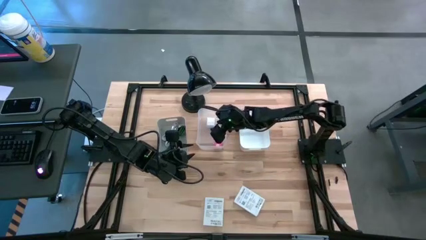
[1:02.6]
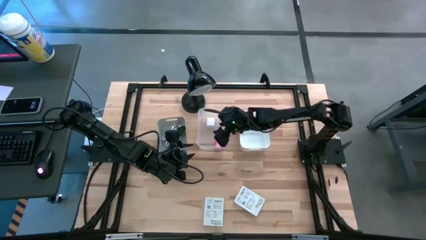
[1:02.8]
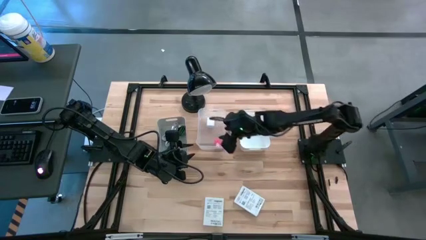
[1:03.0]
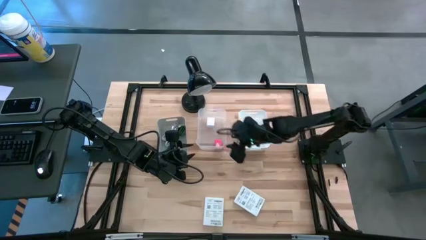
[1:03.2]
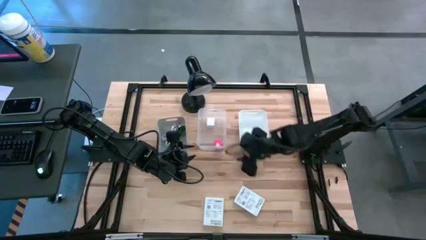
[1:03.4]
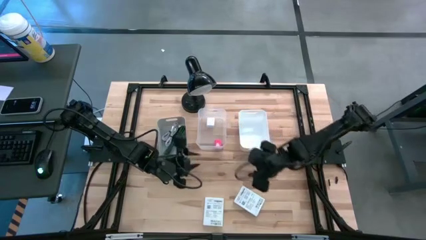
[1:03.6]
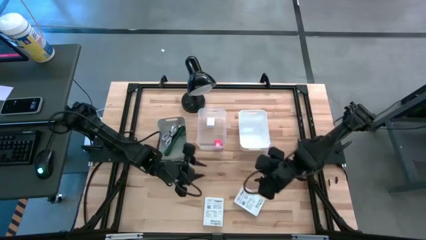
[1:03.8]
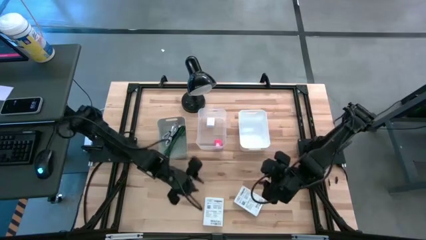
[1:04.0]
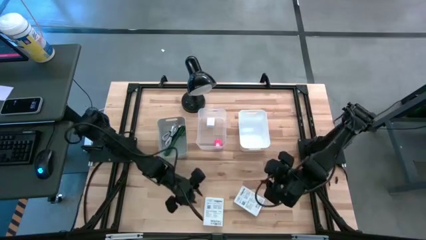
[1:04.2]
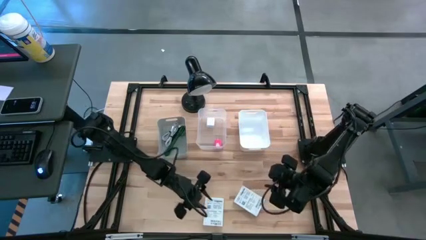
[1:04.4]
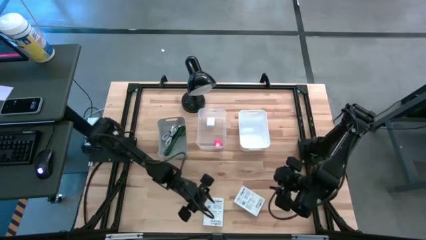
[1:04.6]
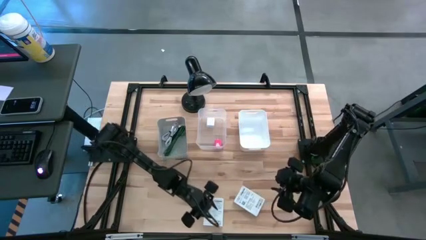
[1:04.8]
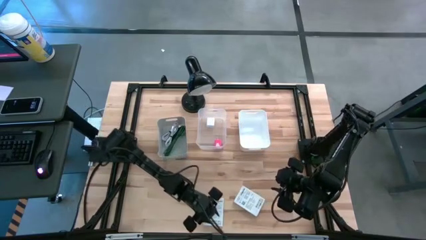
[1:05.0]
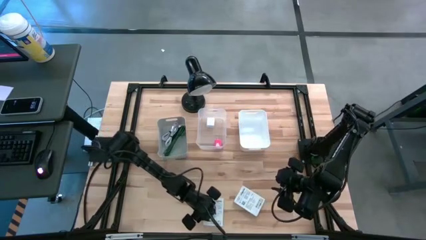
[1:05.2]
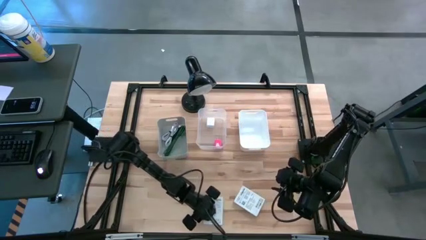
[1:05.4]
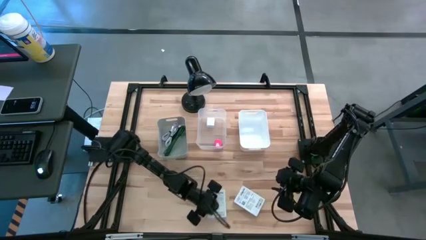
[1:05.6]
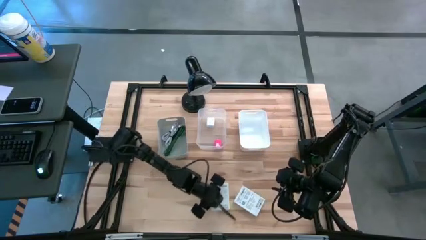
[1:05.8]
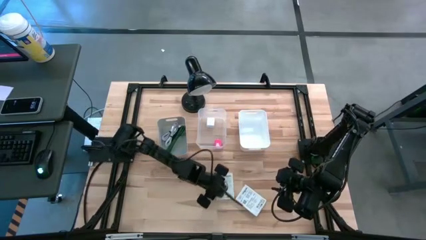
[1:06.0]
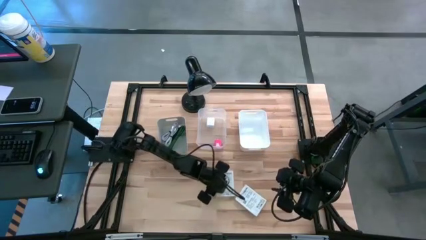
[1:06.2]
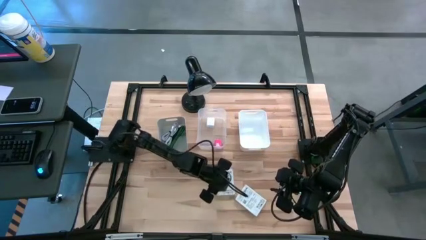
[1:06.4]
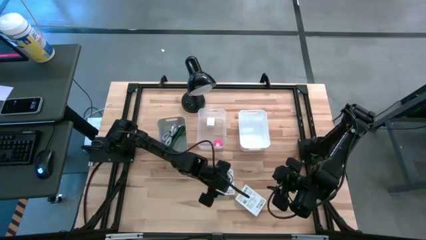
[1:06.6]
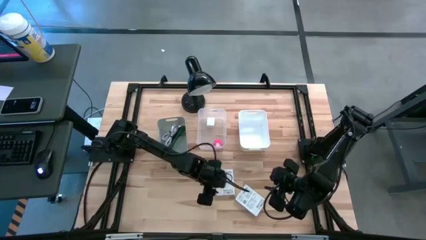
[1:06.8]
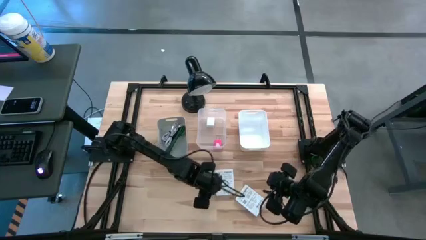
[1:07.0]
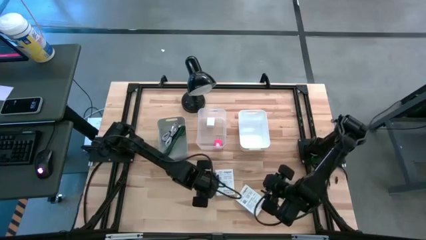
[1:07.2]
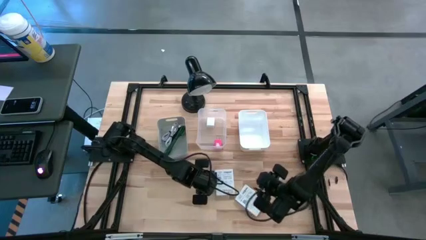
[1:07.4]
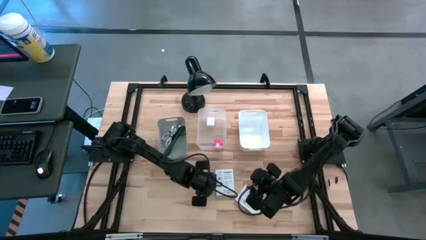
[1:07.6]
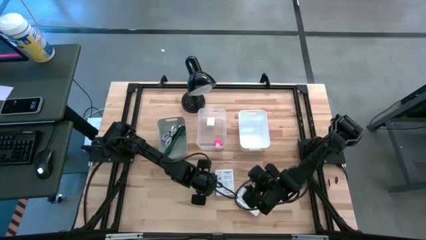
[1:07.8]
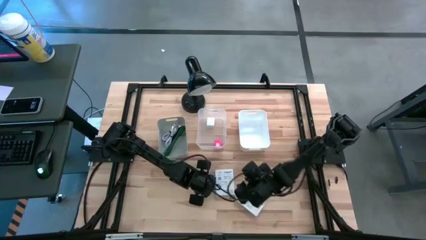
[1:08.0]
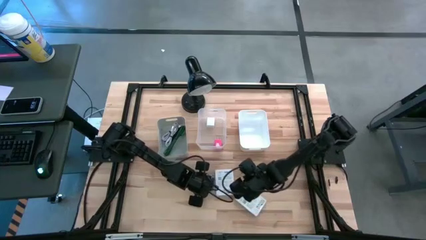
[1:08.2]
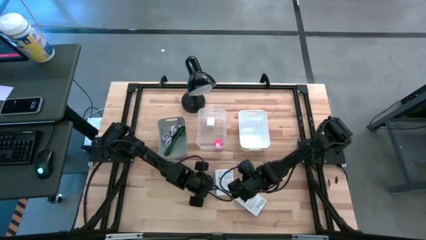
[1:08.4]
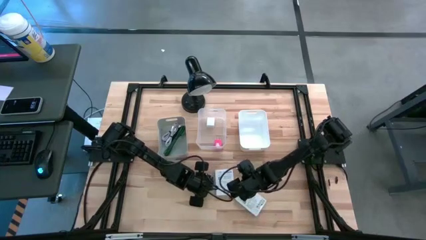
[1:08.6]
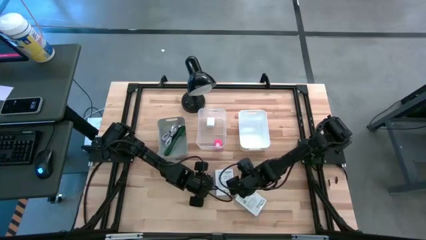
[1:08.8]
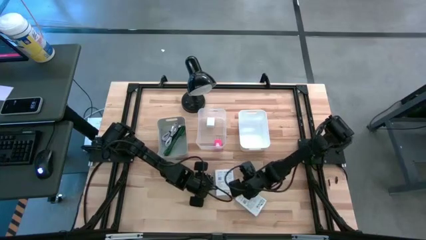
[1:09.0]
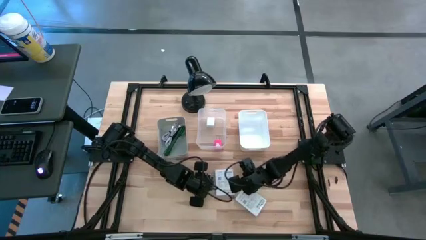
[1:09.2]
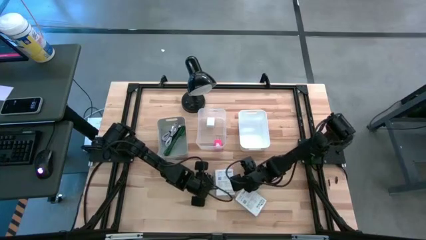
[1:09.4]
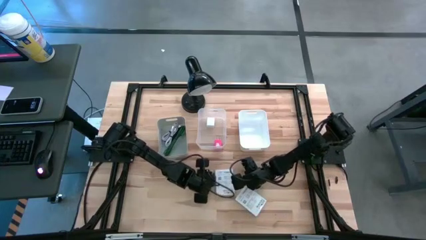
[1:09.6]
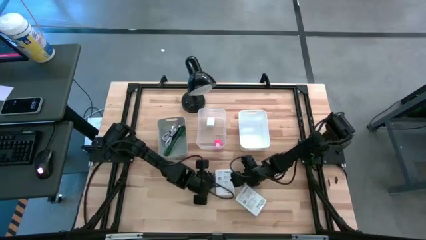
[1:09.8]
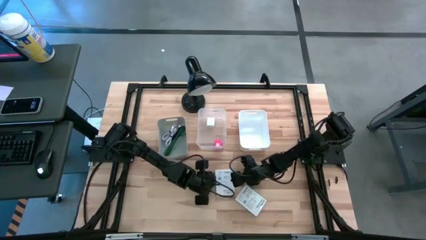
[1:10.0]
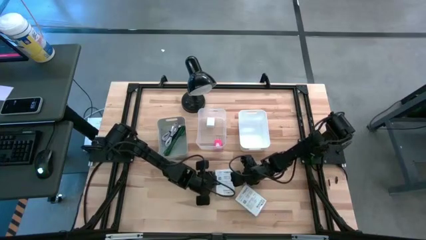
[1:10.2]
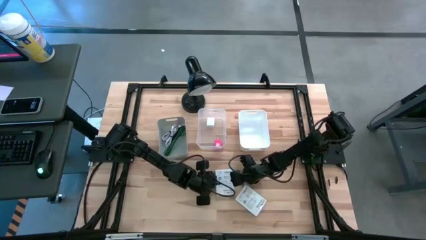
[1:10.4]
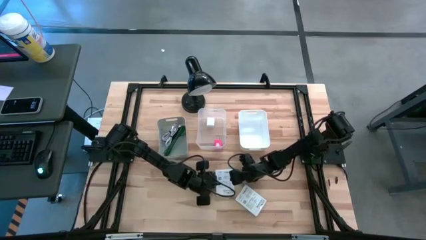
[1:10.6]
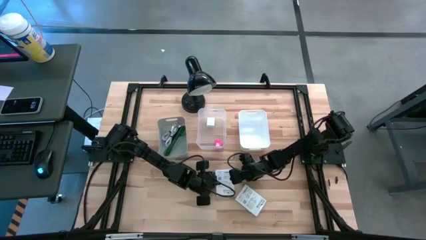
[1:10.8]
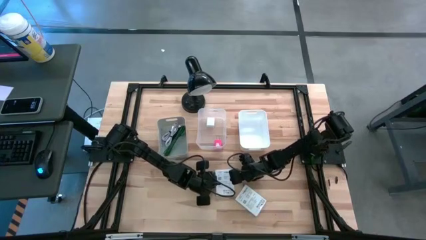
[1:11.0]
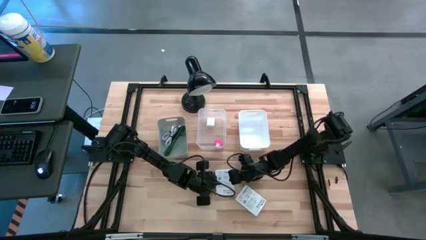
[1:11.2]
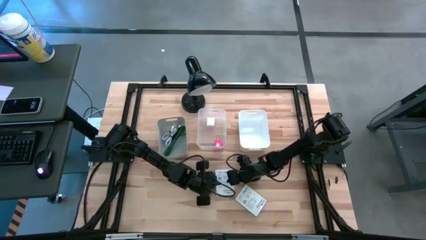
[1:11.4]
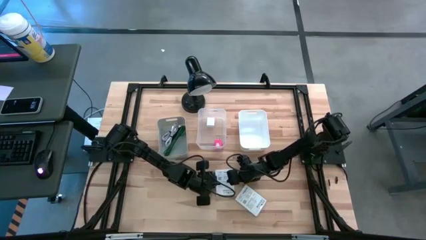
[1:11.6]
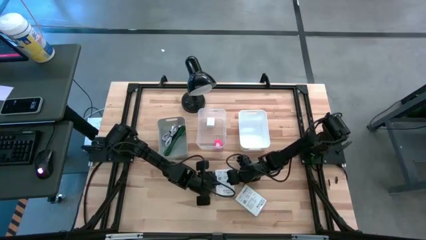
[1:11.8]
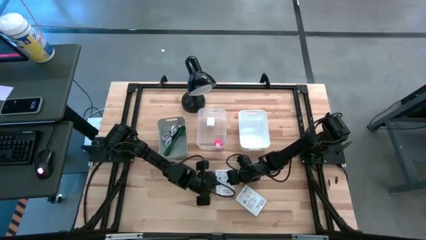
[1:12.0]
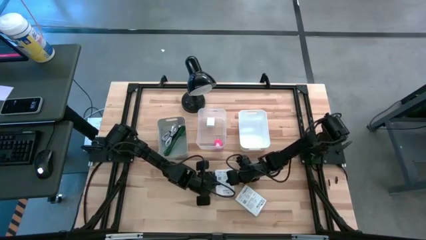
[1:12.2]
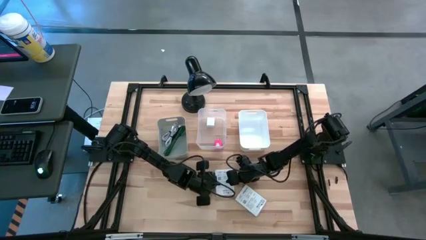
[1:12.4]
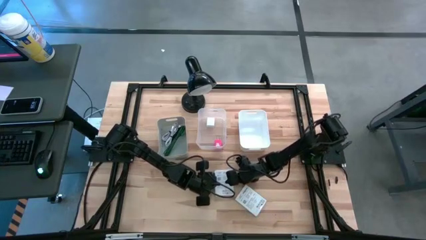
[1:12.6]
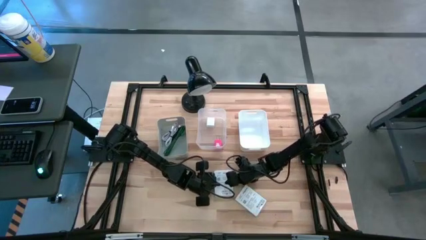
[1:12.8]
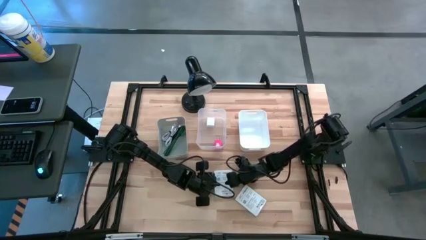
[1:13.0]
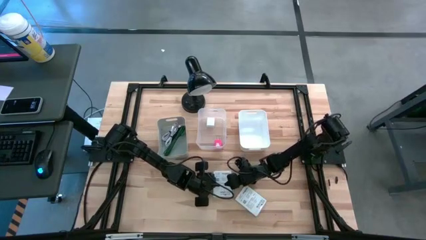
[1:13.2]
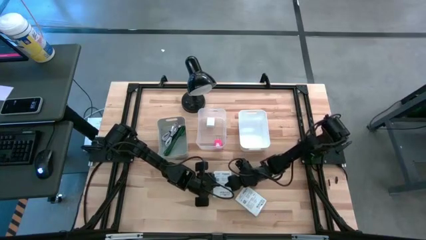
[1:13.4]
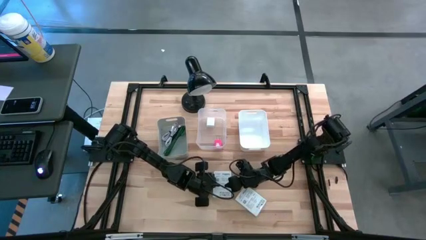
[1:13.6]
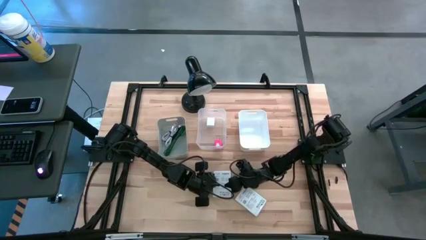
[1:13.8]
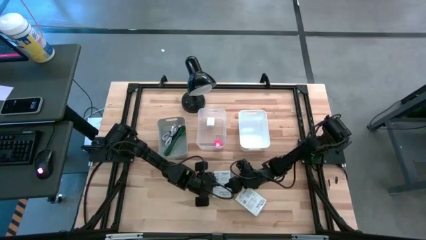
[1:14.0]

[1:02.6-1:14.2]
Task: Pick and place items into bin
Put the left white box into the white bin

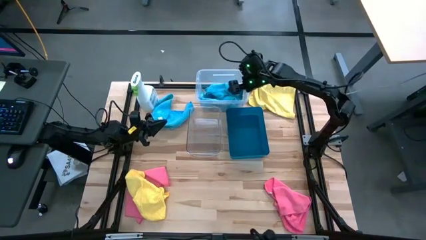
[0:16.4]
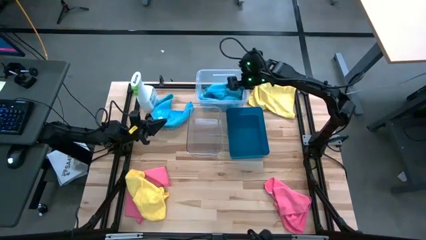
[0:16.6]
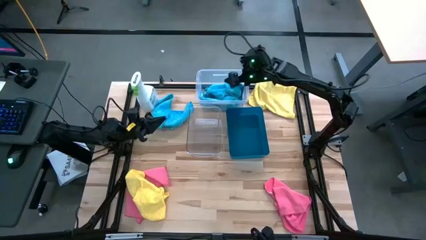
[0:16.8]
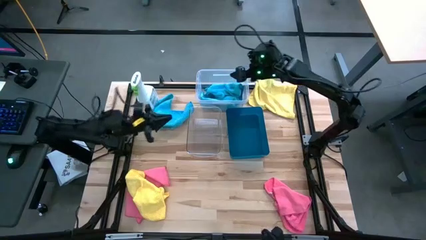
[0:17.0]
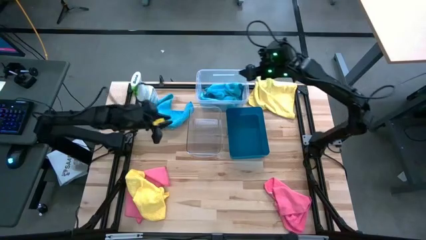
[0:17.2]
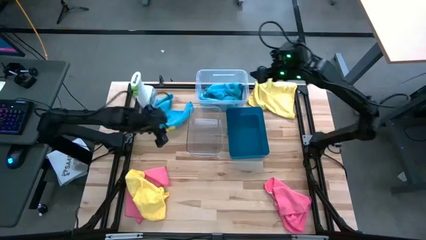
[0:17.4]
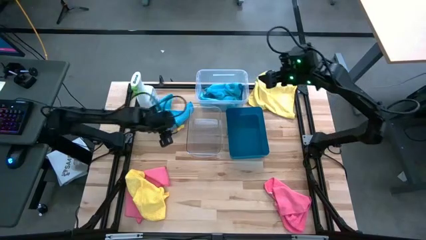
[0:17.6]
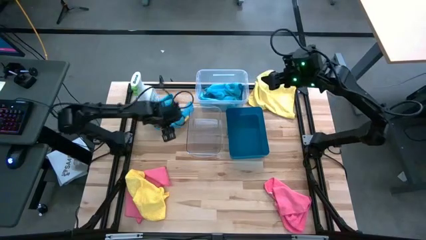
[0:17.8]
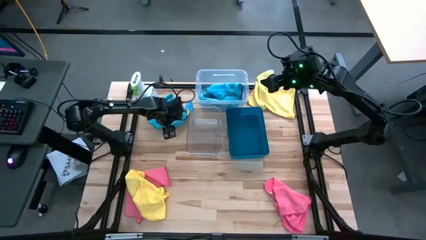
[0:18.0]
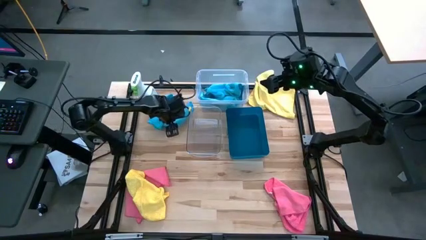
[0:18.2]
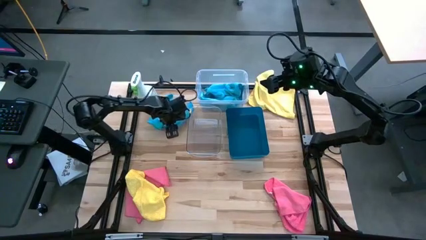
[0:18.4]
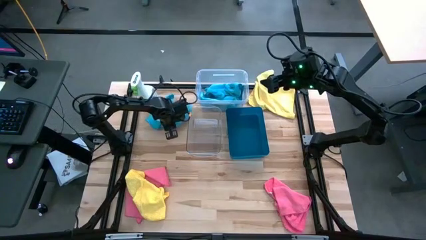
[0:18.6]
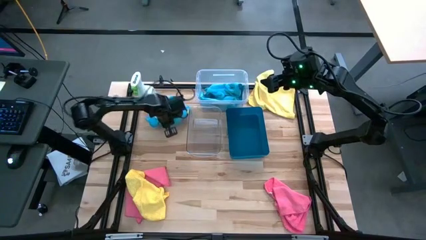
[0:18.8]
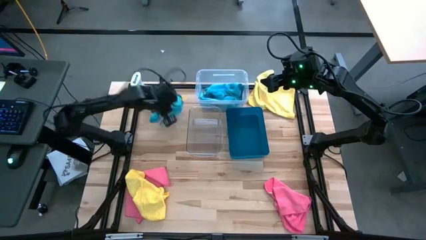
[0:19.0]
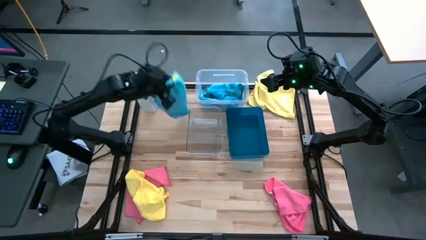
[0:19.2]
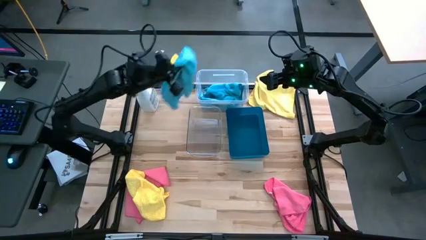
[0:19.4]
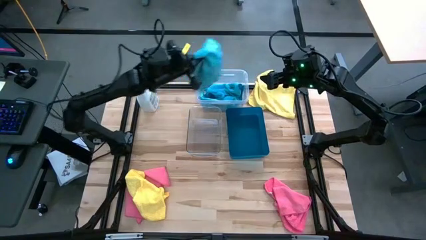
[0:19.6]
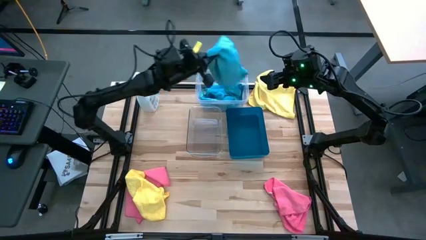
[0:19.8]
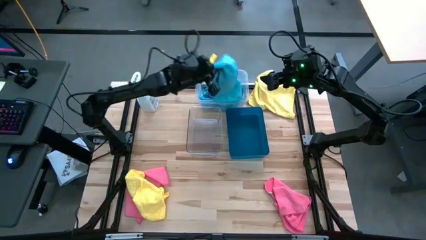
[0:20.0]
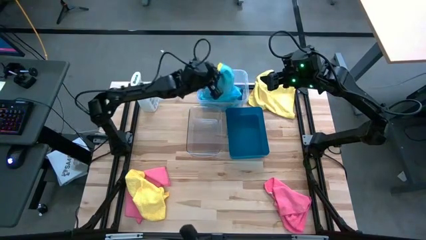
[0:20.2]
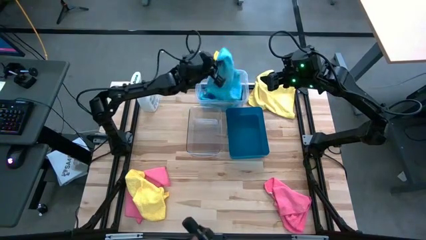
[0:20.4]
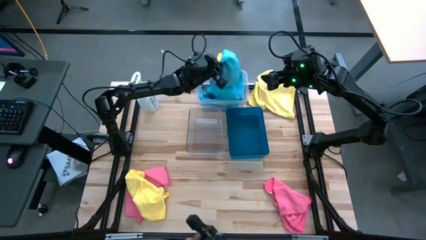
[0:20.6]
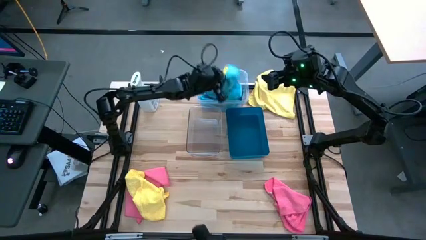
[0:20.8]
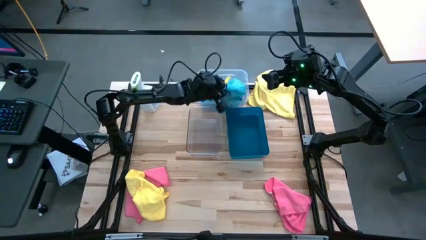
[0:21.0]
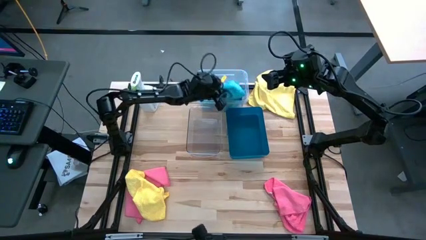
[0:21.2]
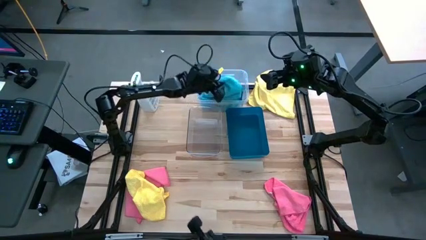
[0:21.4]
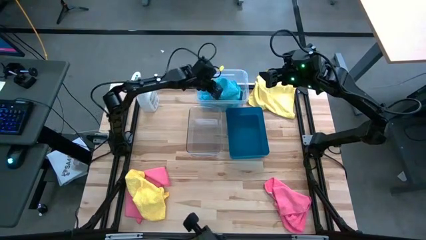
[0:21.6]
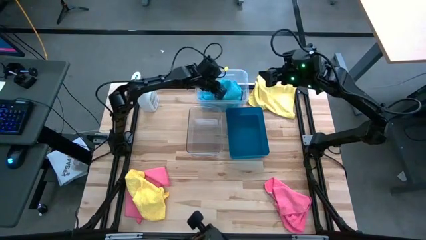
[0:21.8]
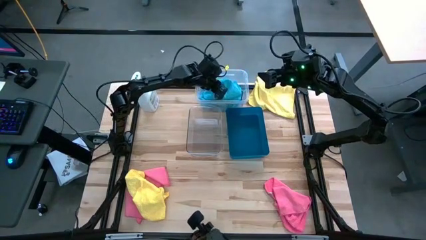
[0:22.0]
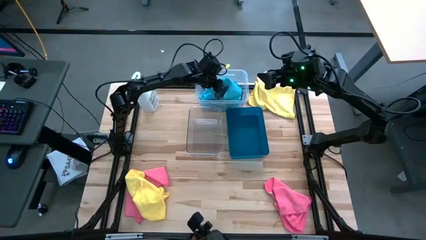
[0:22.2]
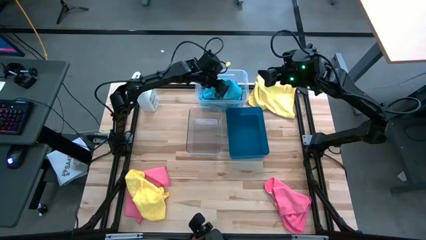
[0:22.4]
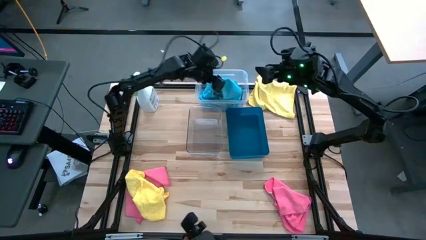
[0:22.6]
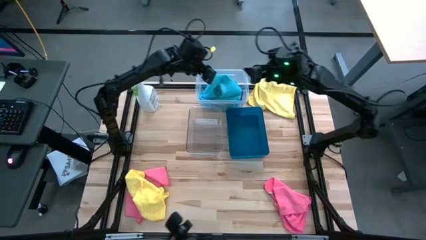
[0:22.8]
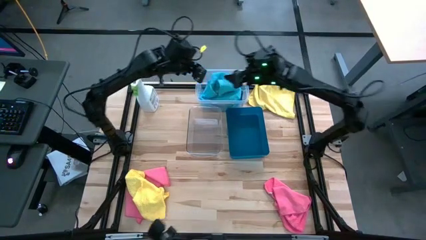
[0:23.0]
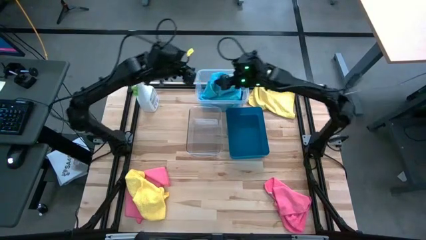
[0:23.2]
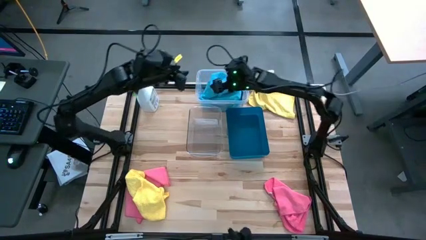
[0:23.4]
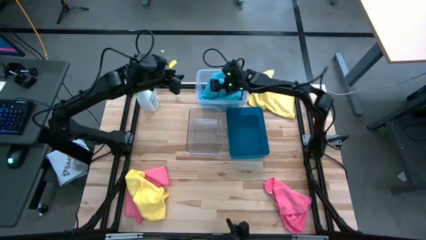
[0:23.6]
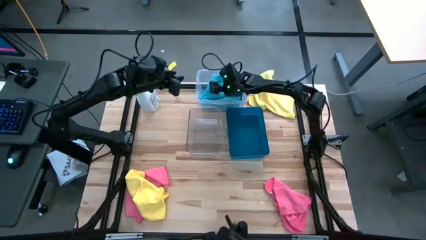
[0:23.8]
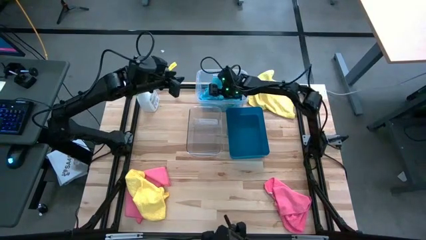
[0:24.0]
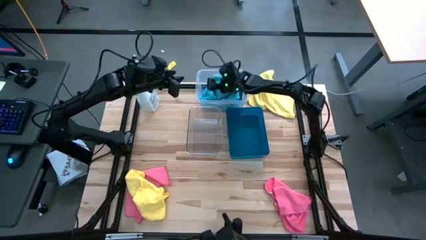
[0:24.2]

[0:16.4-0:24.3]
Task: Sort microfiber towel by color & place in baskets
Put the blue towel into the top transparent bin
